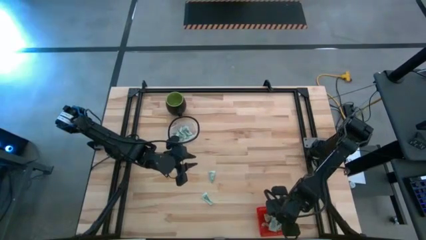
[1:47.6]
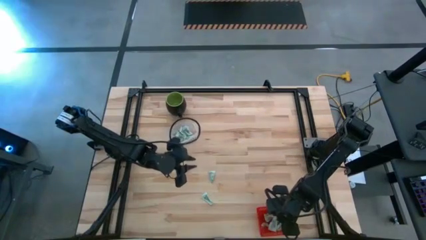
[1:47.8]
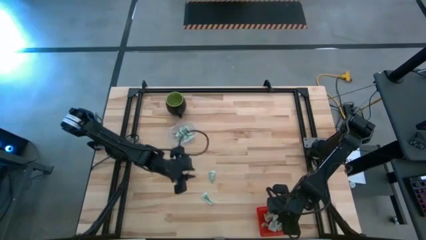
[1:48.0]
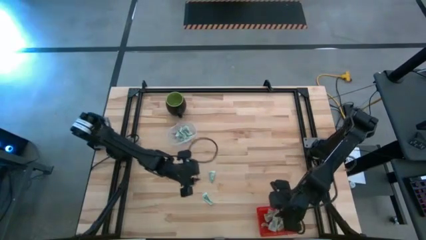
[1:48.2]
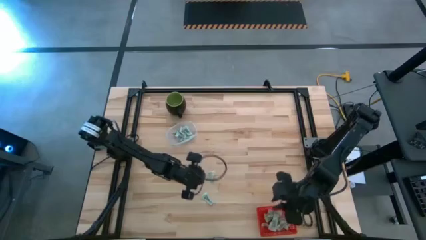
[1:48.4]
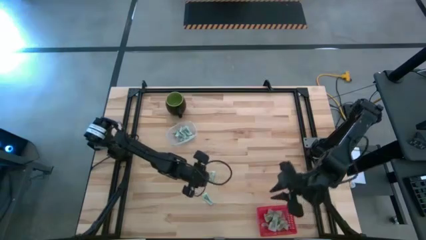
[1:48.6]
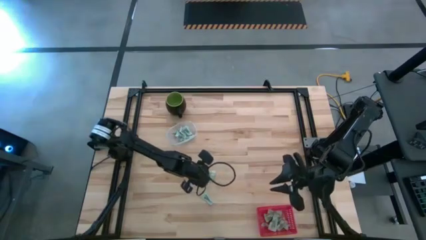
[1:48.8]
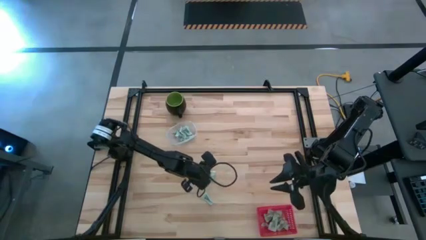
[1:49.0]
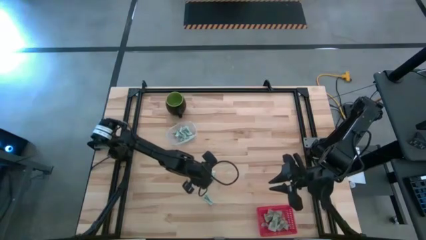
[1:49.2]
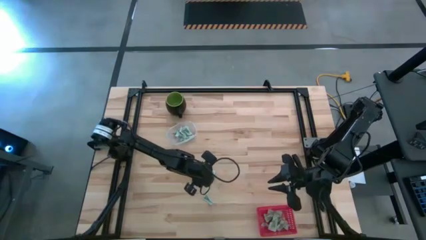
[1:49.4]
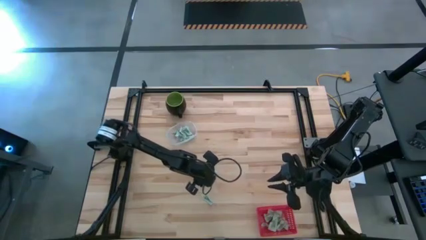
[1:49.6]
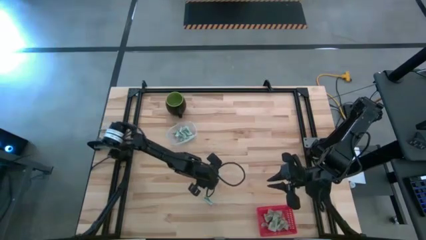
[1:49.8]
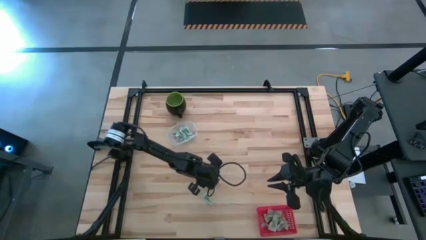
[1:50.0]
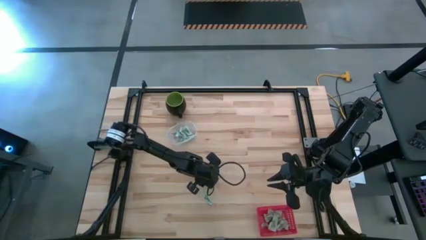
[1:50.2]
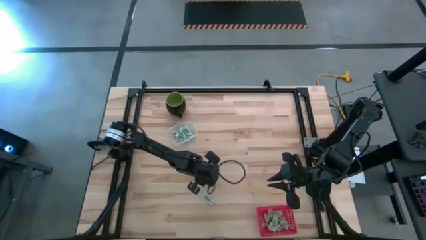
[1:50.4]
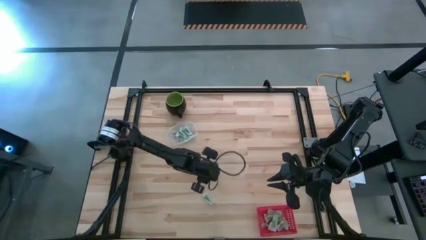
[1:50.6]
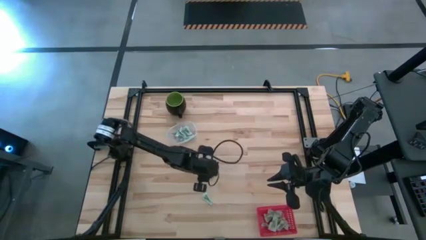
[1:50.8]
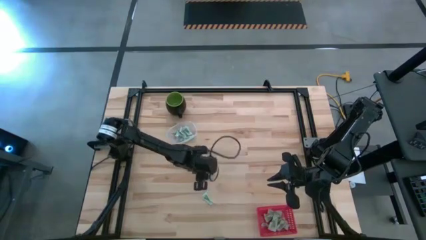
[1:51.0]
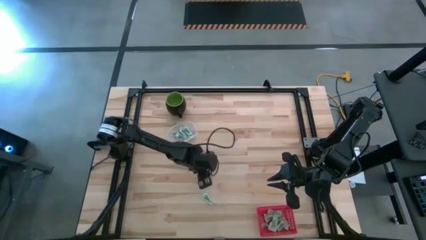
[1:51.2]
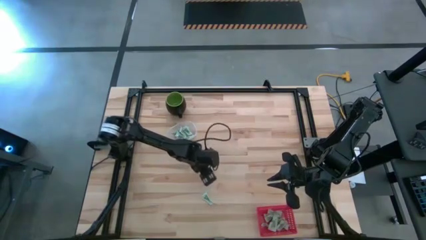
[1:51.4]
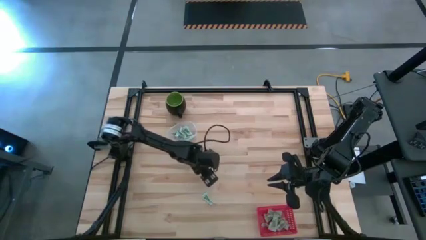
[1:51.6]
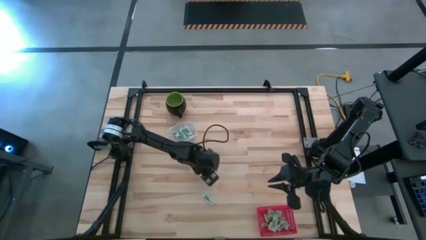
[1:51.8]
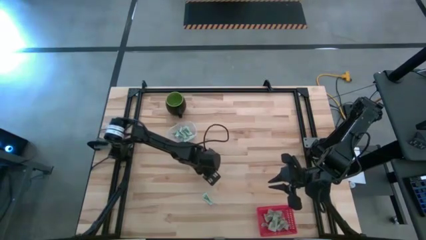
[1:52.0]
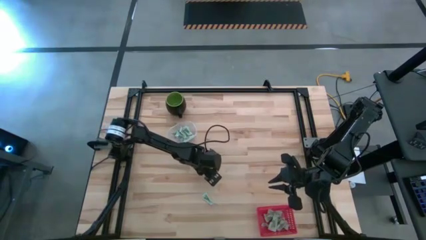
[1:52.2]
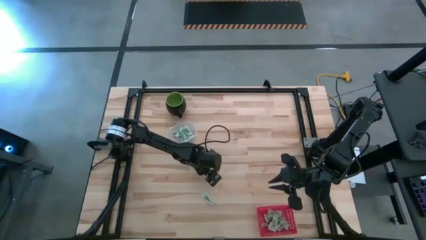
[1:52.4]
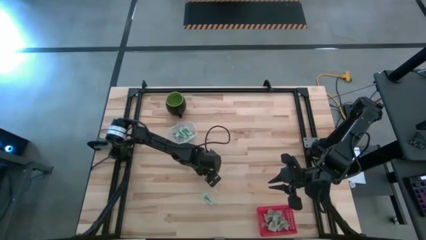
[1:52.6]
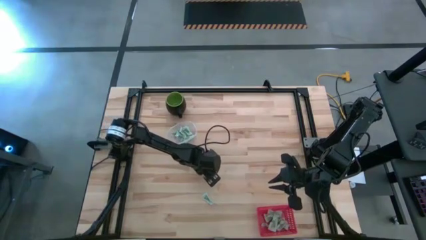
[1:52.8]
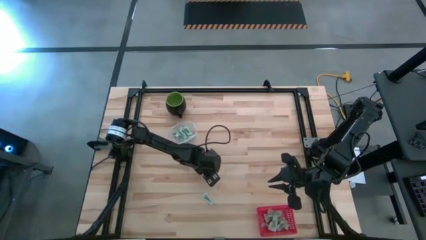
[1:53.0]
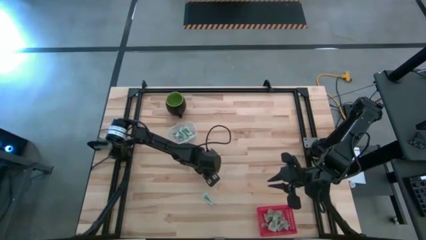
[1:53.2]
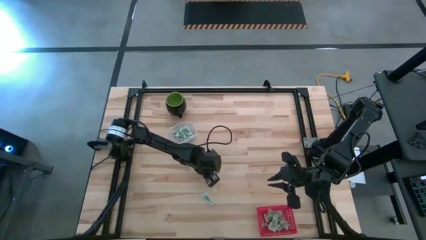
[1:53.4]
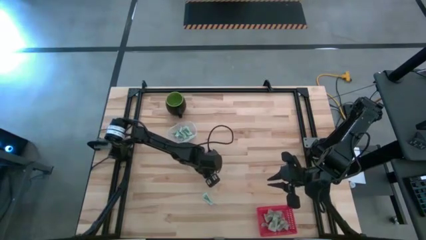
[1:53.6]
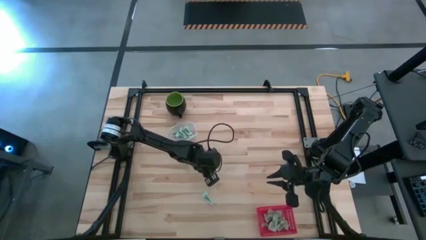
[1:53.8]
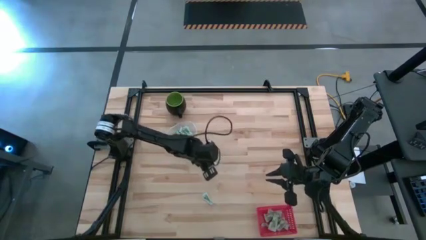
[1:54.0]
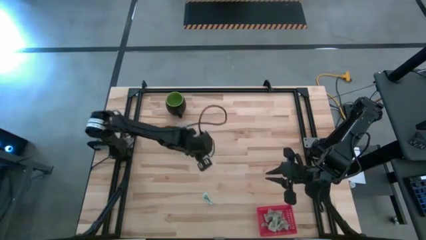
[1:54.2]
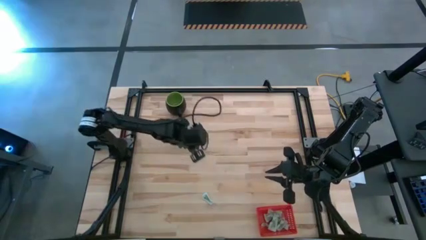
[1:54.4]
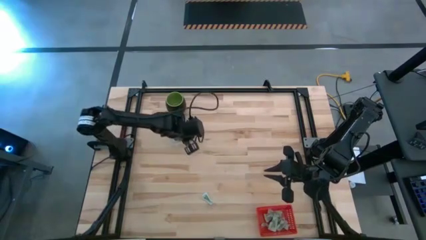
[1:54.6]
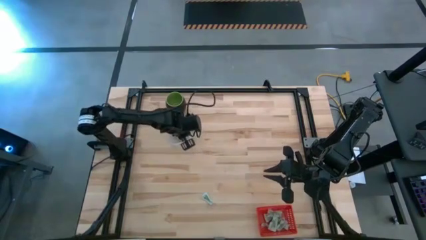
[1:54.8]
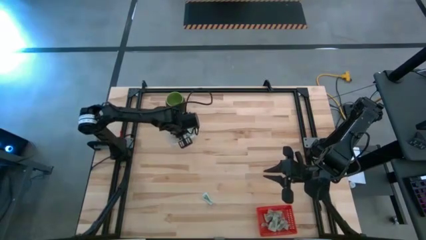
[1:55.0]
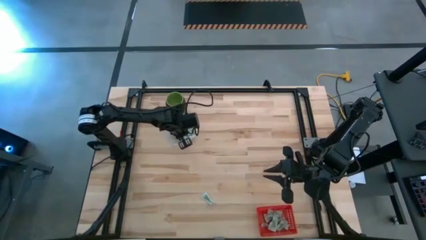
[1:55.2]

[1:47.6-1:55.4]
Task: Pick and place items into bin
Put the green stevia packet into the transparent bin

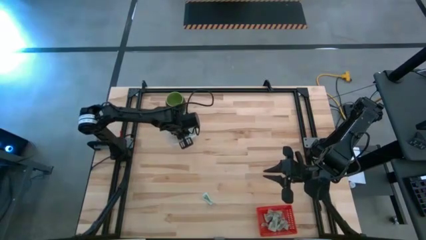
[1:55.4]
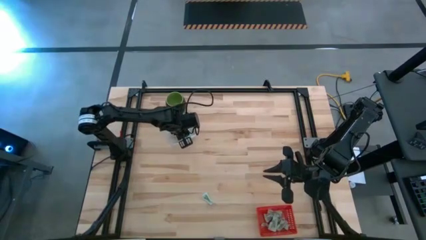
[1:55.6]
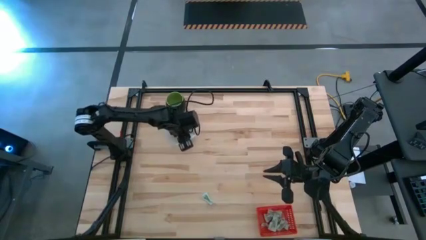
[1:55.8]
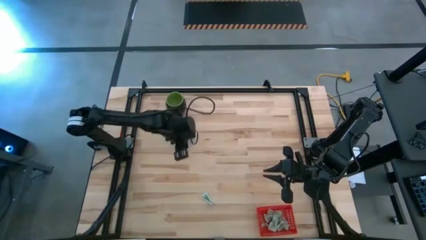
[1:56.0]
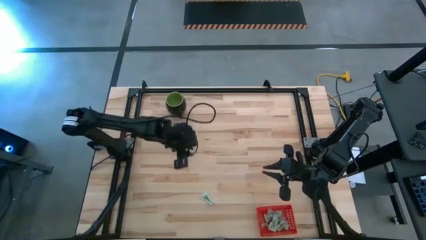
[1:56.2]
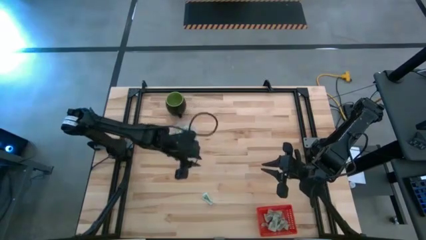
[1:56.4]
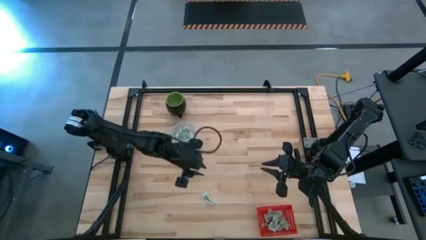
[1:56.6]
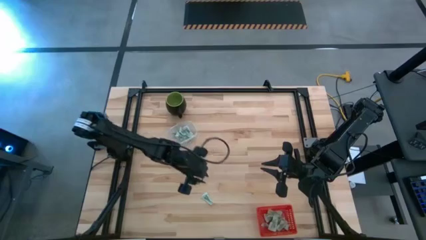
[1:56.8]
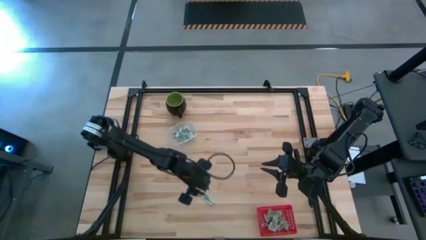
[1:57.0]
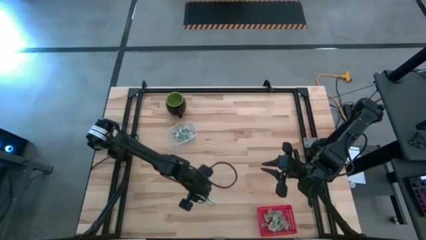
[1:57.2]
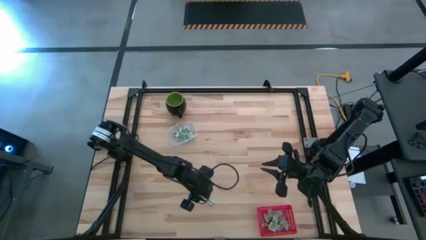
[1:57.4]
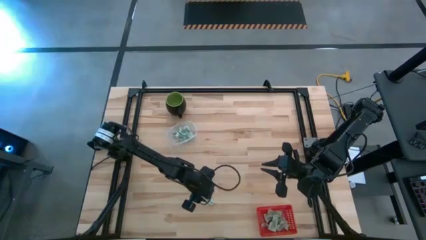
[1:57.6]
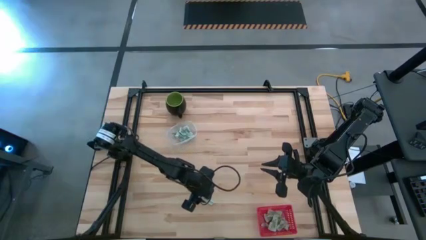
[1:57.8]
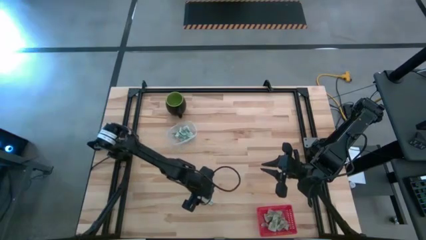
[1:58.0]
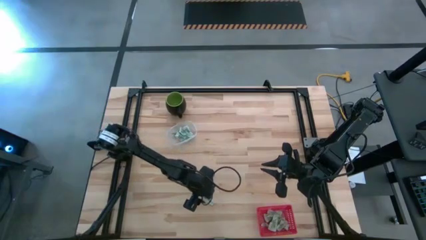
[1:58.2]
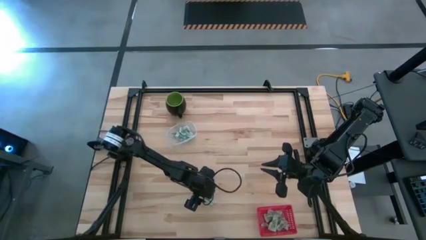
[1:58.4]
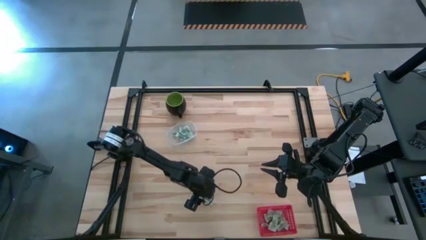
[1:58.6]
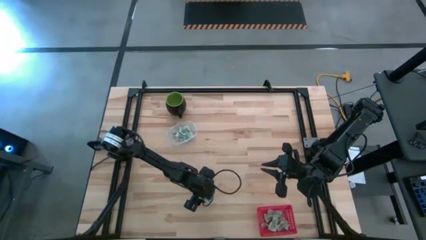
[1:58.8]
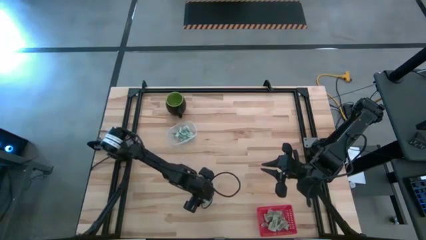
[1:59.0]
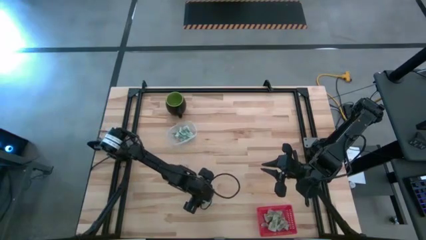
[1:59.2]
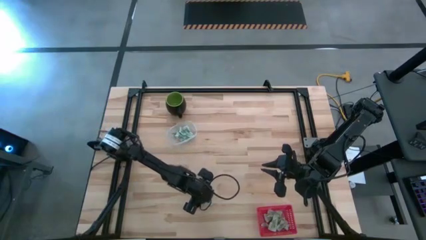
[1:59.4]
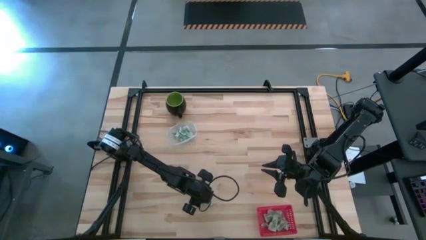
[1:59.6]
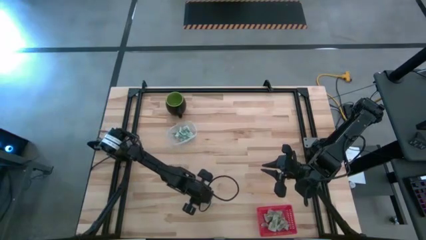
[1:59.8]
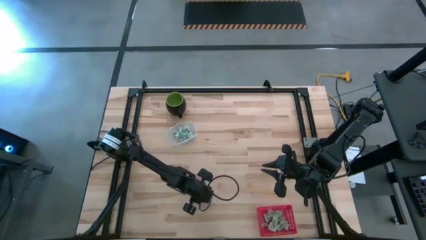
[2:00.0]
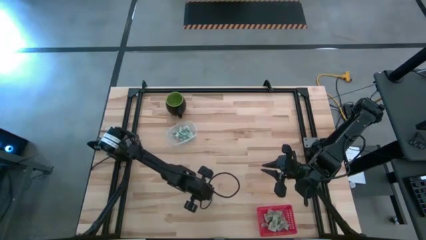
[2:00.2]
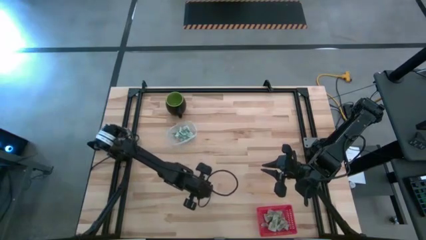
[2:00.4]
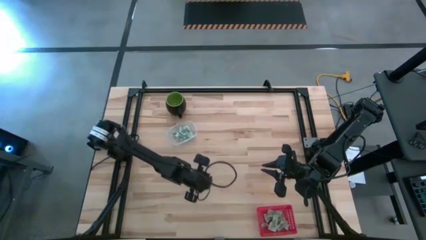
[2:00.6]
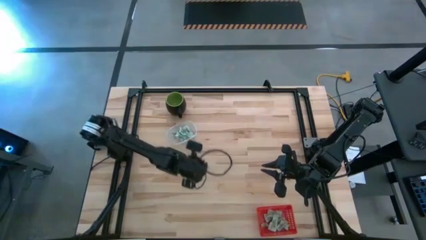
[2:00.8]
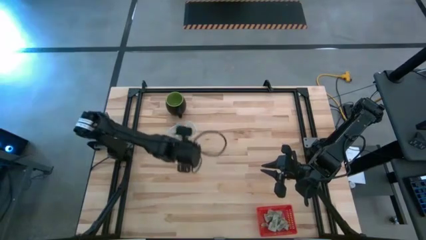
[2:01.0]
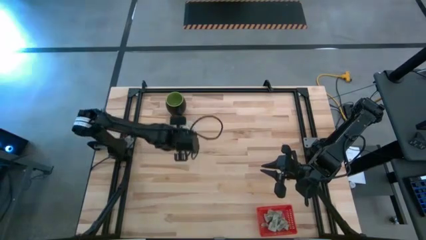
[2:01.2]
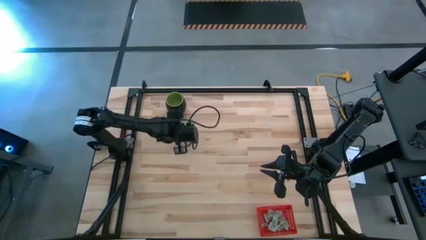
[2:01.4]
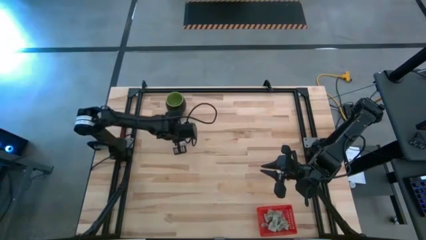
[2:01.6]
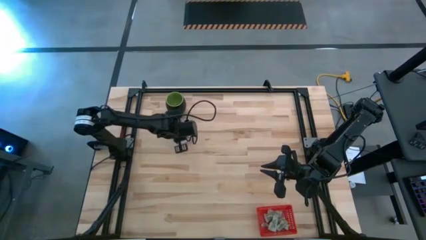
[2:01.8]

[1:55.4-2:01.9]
Put the green stevia packet into the transparent bin

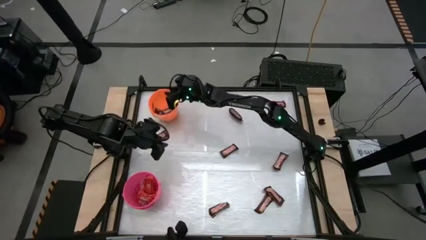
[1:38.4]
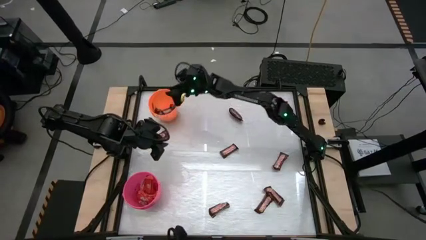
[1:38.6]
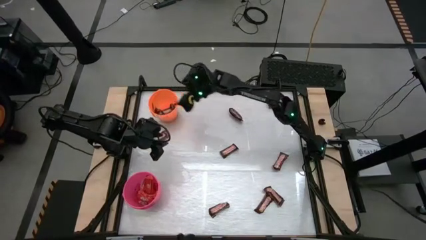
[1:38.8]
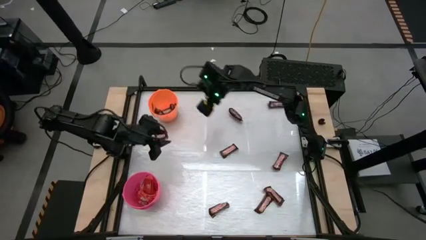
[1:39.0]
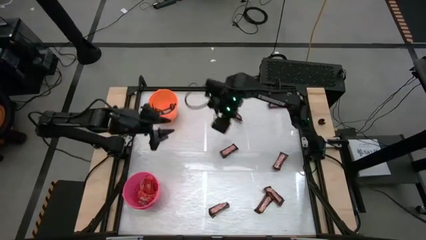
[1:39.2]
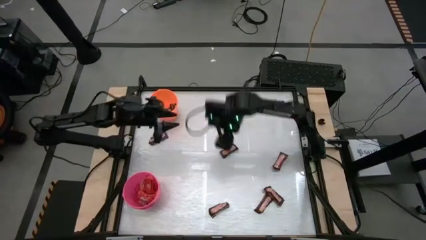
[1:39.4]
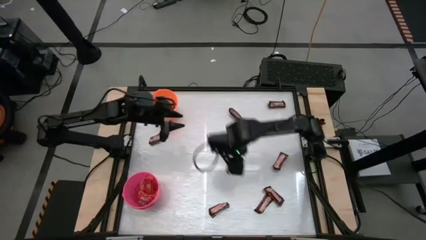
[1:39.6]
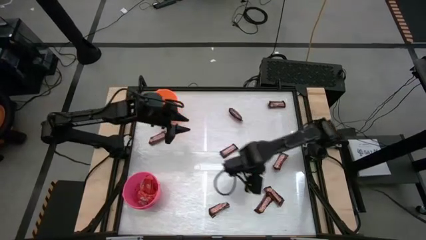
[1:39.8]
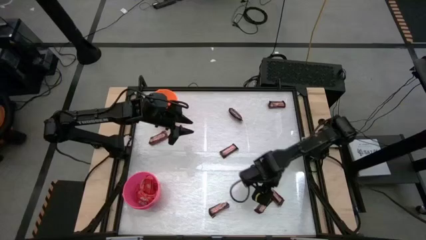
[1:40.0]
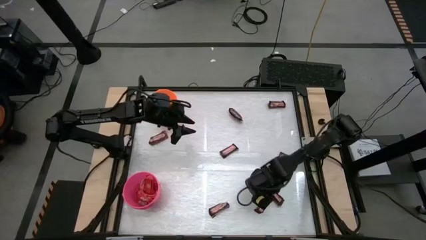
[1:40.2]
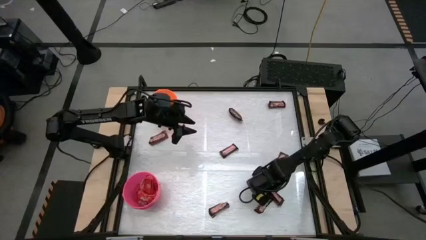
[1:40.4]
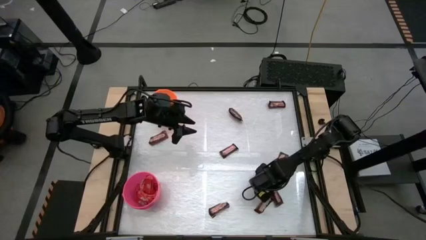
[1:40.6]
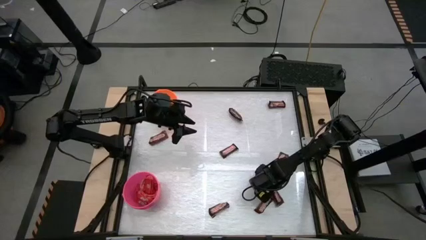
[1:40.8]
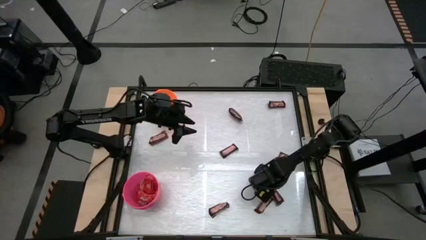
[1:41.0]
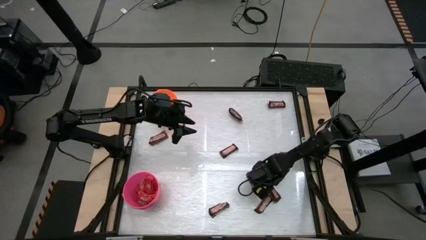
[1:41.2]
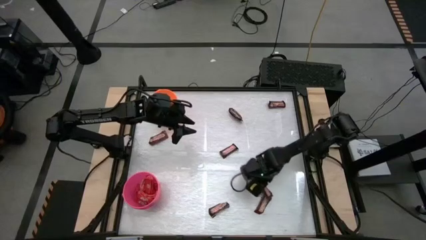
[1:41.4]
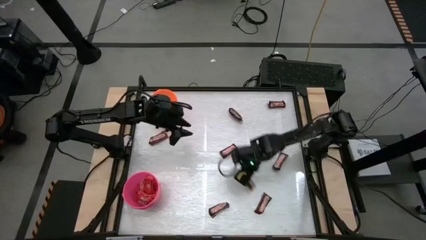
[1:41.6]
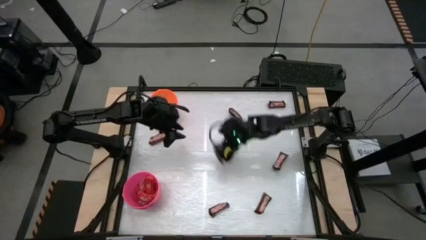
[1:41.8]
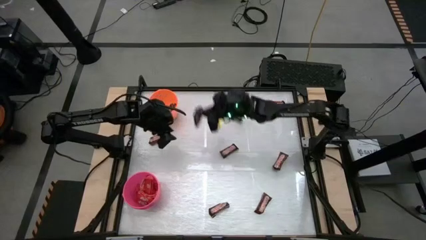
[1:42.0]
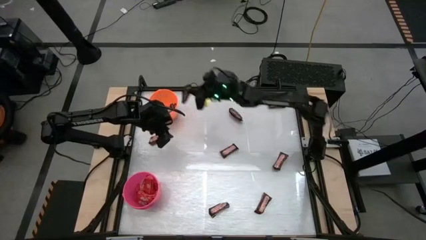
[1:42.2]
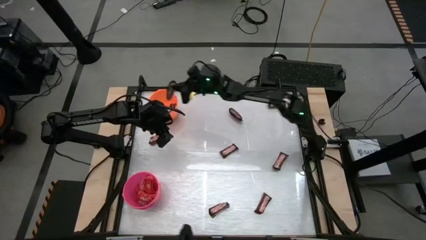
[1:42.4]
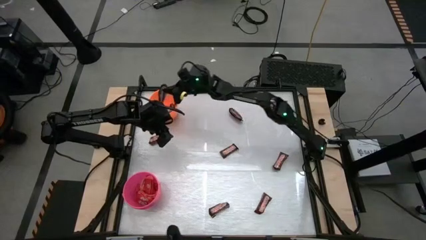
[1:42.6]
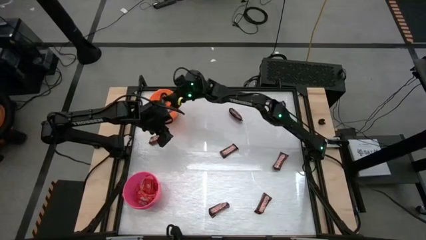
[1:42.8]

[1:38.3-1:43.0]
Task: Sort candy by brand, put in halloween buckets
Put the brown chocolate bar into the orange bucket
